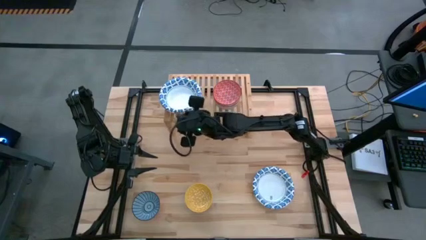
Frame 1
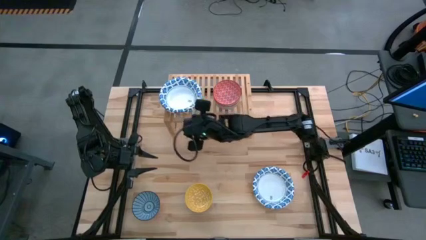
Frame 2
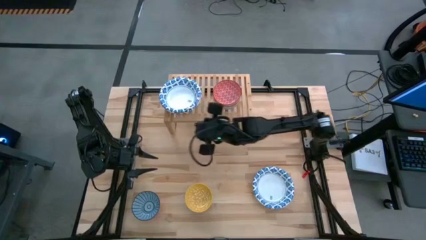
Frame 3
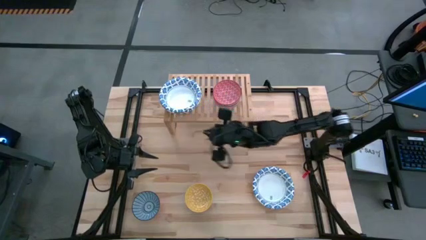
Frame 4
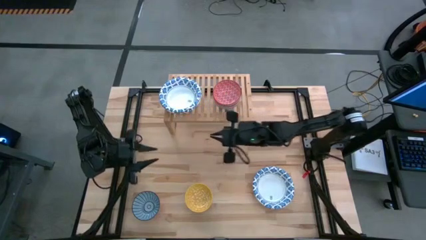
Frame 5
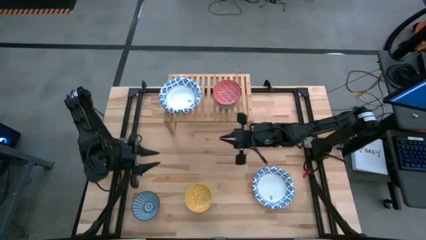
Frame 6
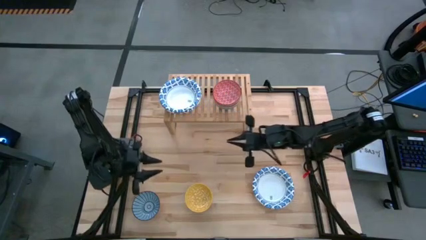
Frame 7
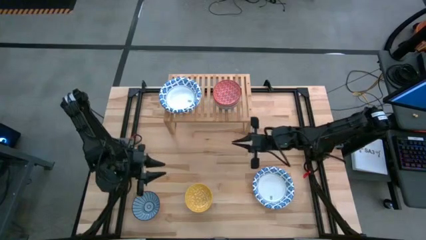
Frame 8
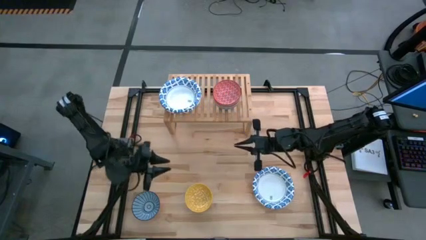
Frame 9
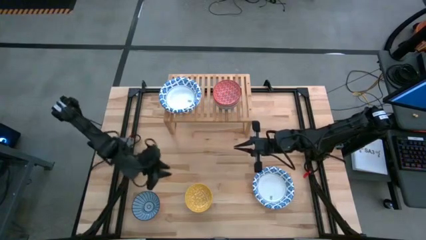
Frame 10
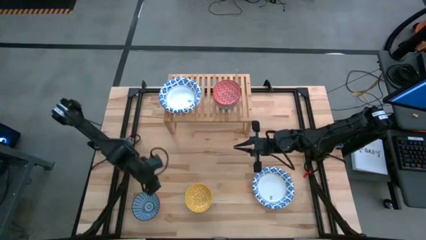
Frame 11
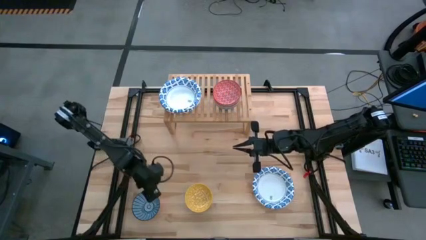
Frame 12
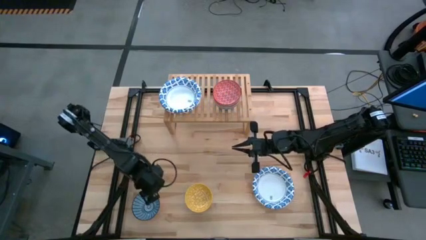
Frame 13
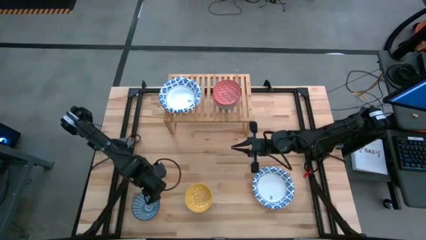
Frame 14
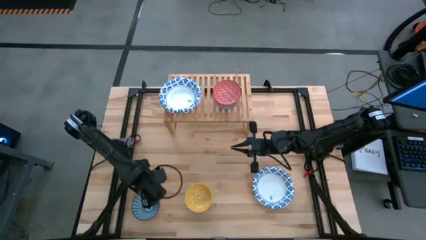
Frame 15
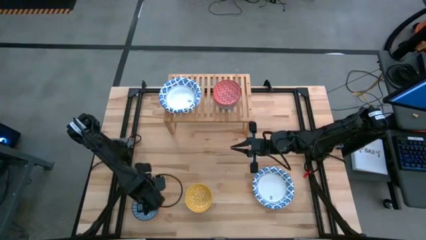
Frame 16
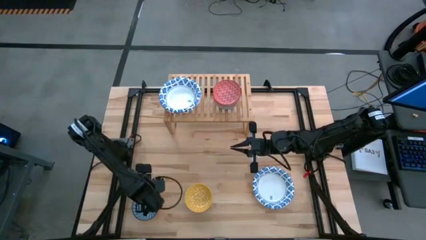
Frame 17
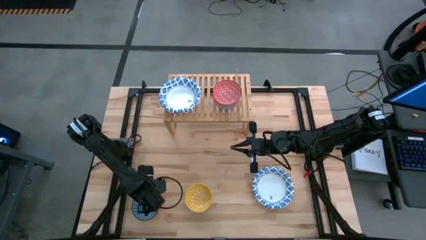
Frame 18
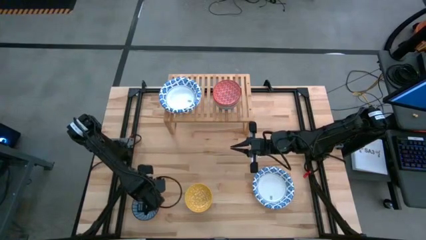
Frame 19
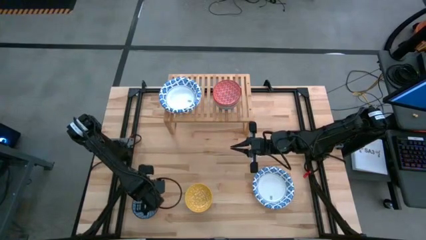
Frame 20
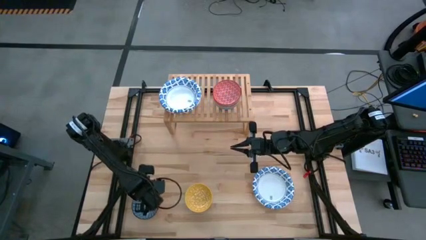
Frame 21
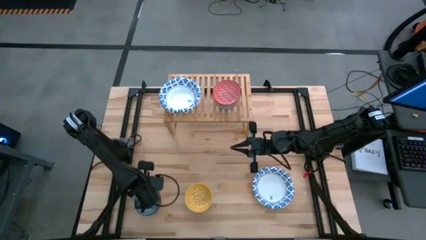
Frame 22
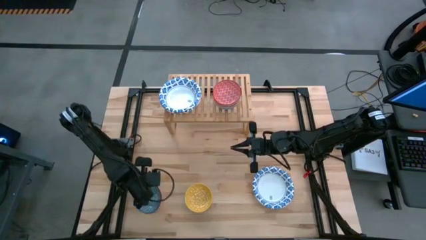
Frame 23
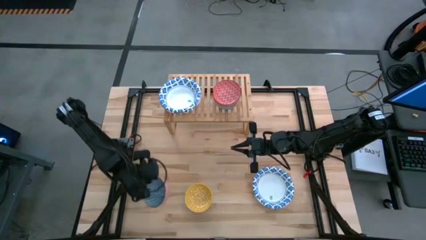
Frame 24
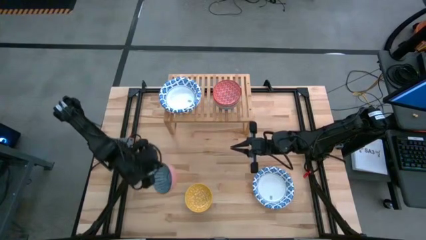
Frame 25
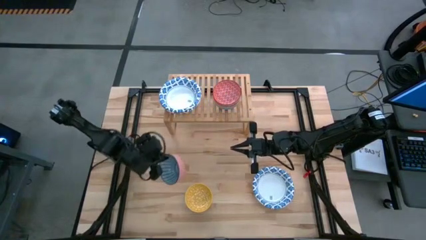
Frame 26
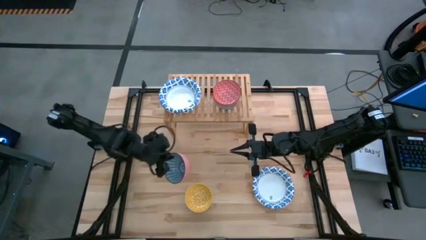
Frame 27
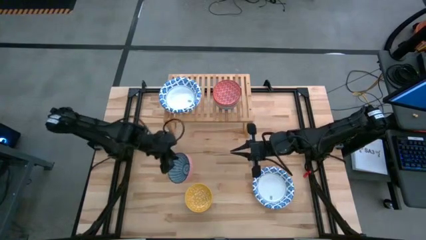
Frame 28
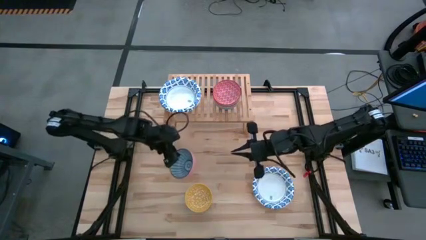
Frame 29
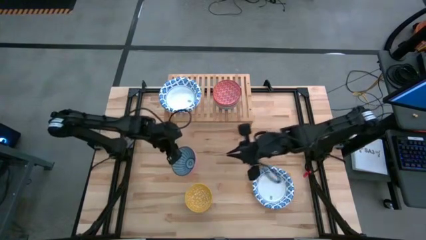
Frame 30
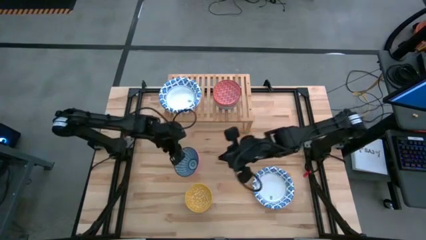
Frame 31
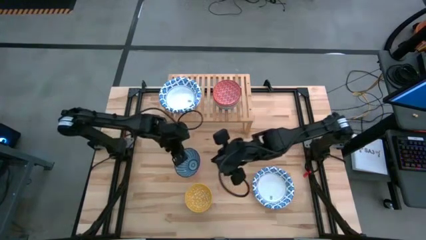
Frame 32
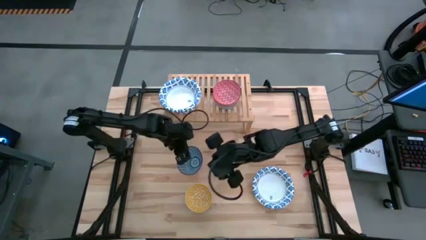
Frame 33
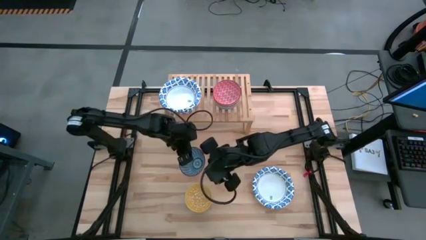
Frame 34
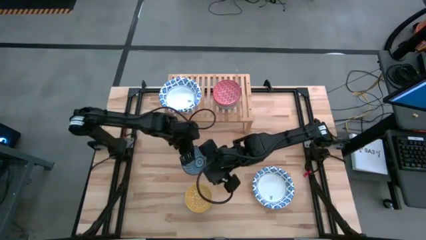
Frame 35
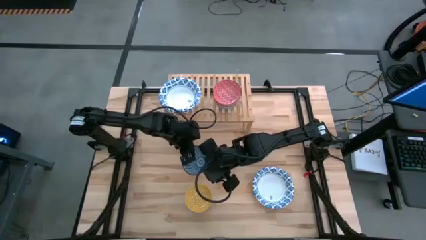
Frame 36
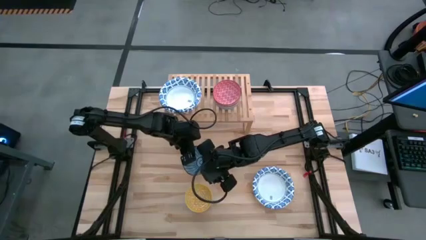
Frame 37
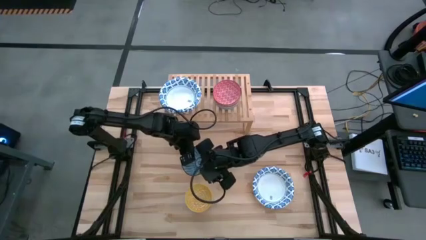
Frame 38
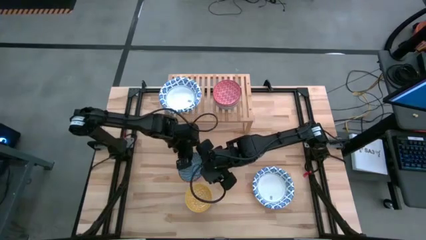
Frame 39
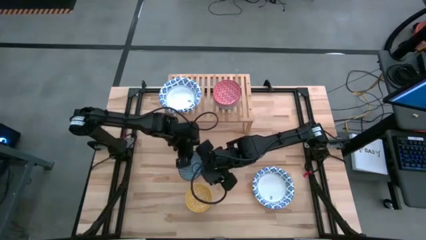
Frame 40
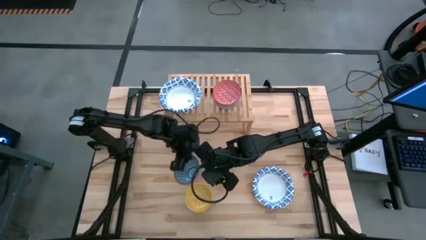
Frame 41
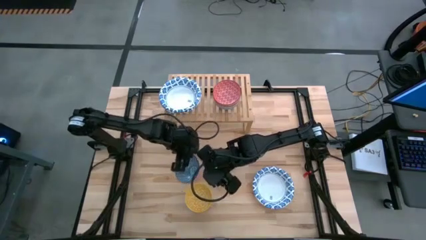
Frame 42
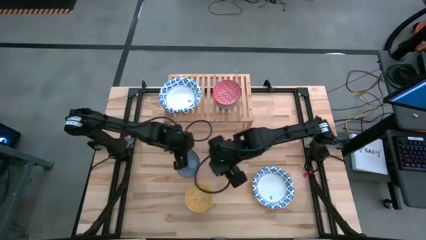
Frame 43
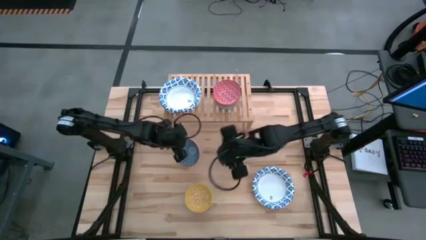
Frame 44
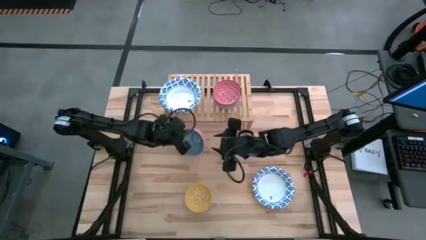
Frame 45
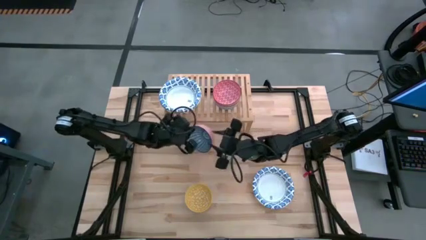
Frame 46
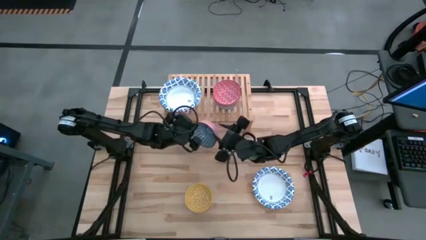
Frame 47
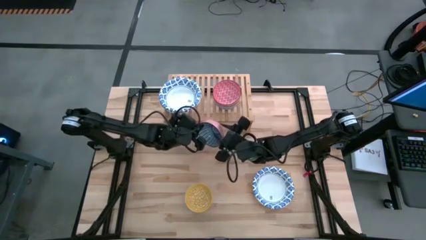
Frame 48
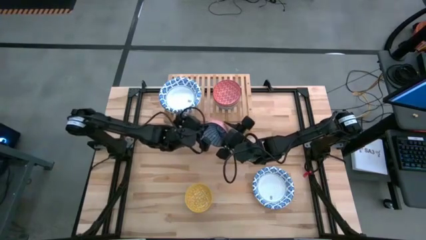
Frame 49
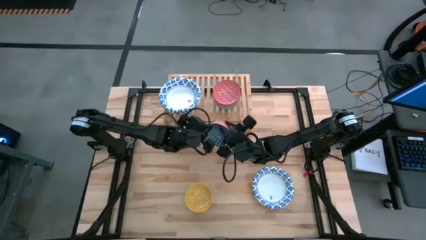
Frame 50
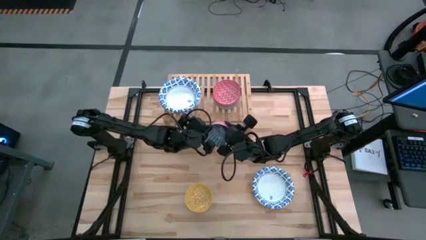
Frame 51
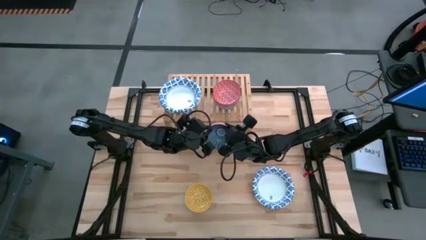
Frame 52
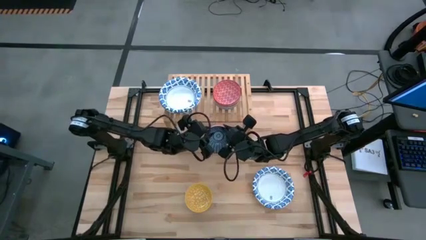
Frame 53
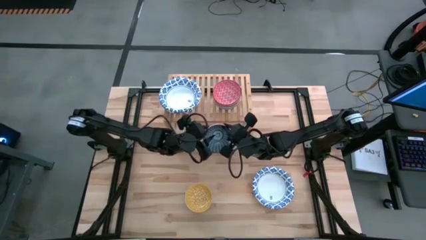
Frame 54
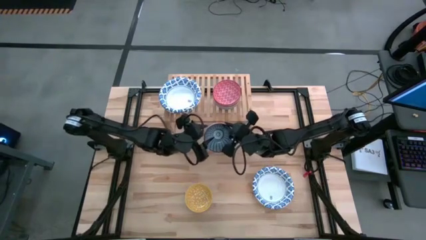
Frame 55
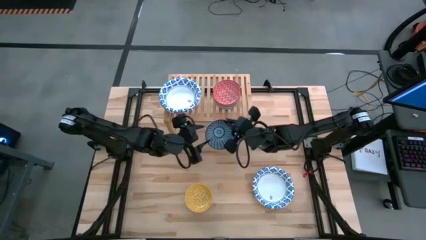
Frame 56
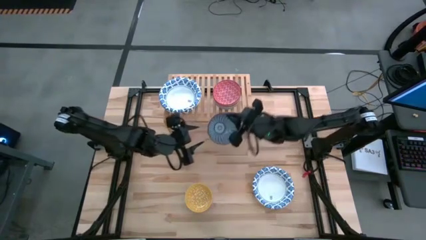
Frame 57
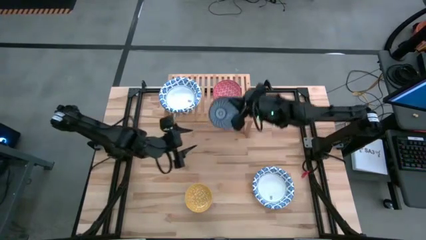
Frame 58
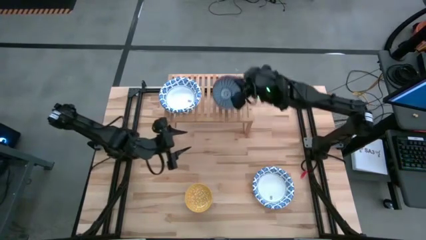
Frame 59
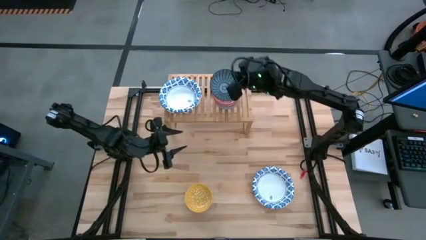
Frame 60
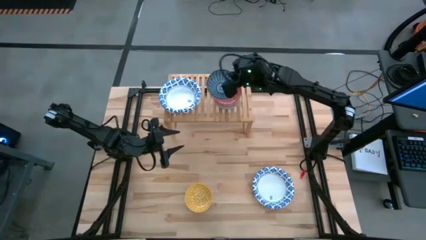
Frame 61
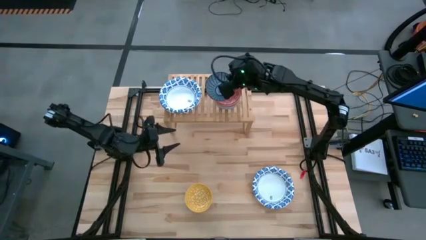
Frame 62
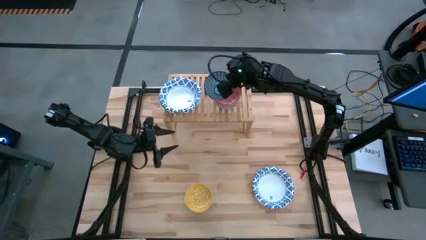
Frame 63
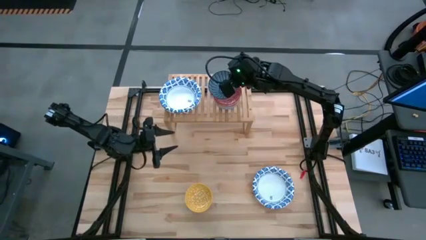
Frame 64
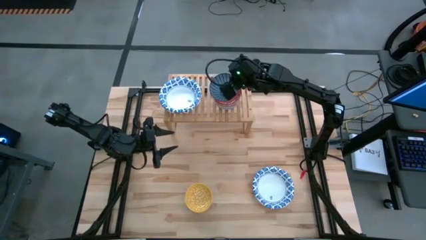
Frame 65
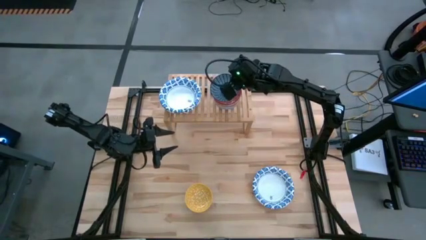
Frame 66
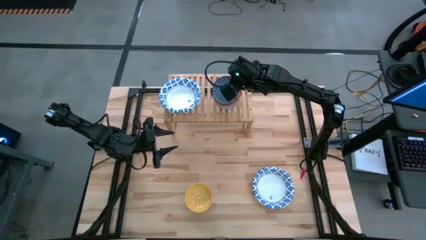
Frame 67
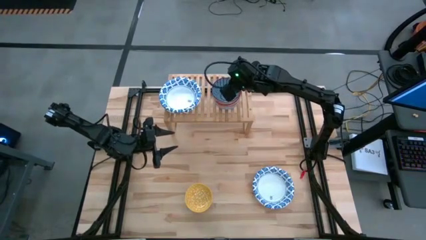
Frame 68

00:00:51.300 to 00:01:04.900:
Task: Place and stack bowls onto a shelf
Stack the blue patterned bowl on top of the red patterned bowl on the shelf
